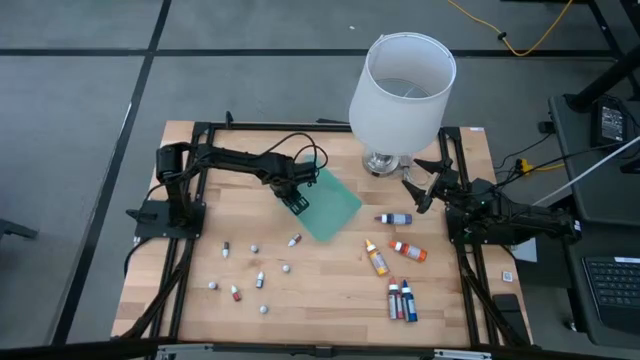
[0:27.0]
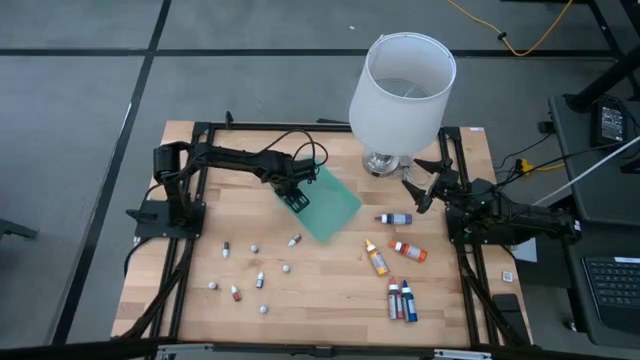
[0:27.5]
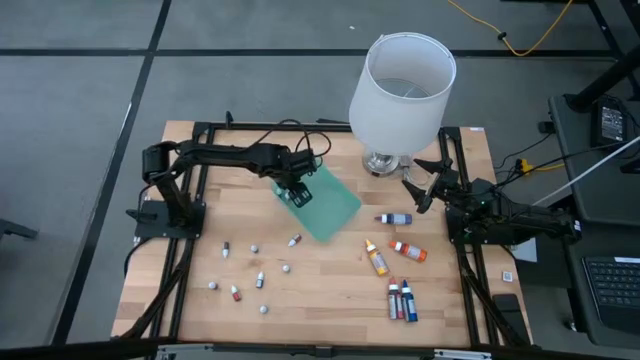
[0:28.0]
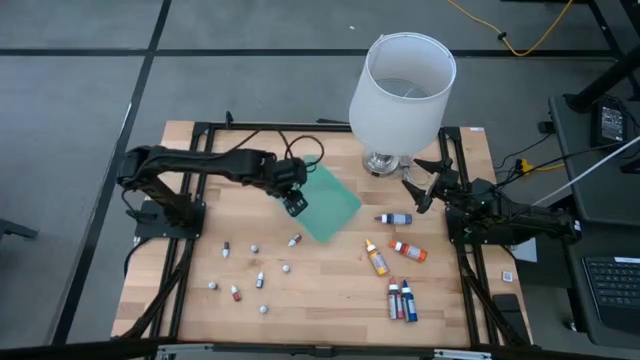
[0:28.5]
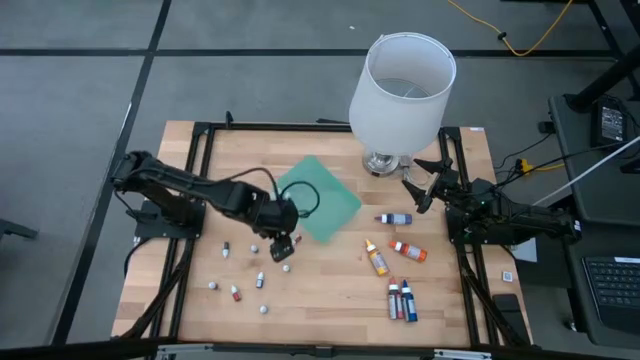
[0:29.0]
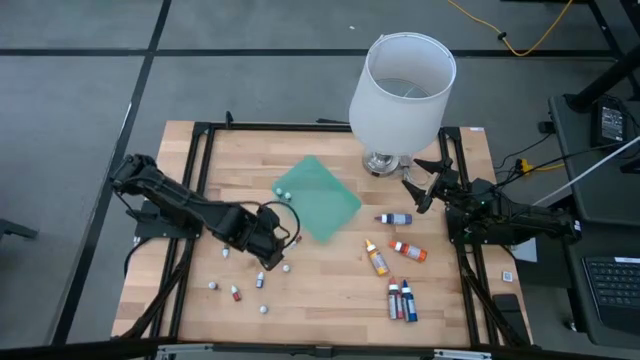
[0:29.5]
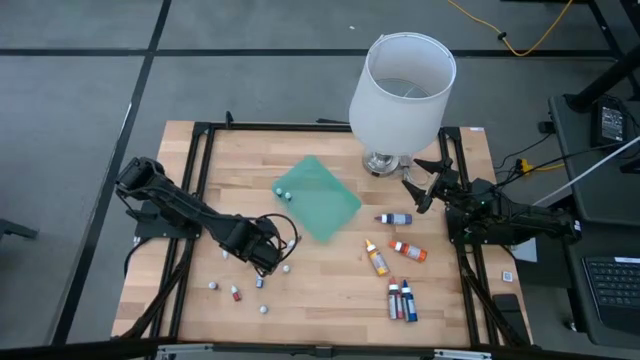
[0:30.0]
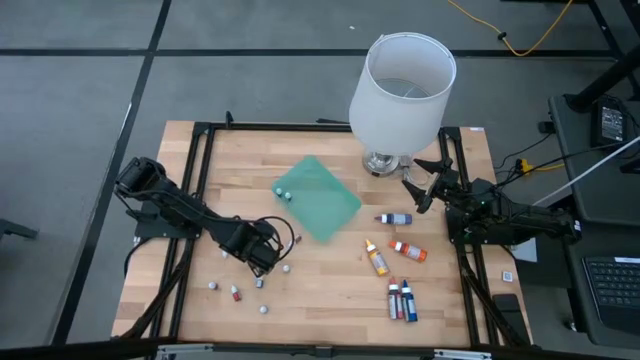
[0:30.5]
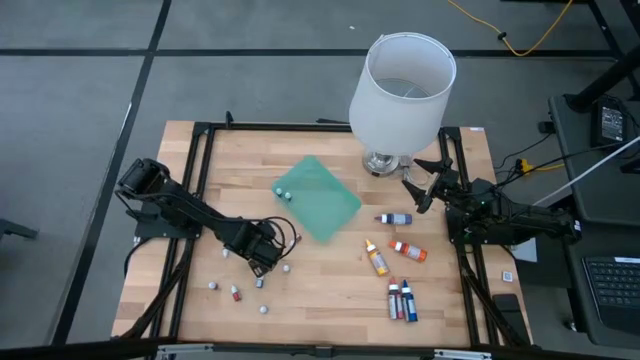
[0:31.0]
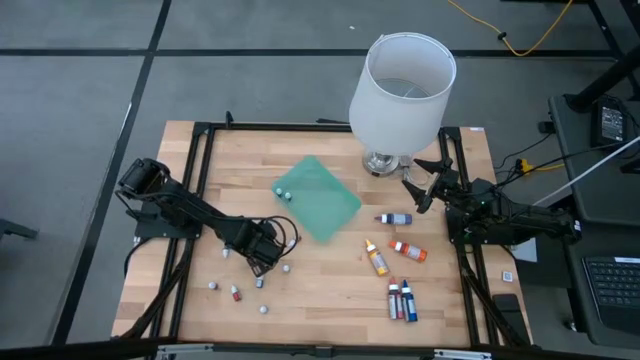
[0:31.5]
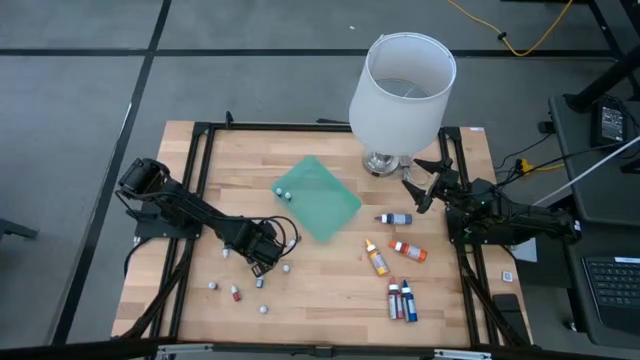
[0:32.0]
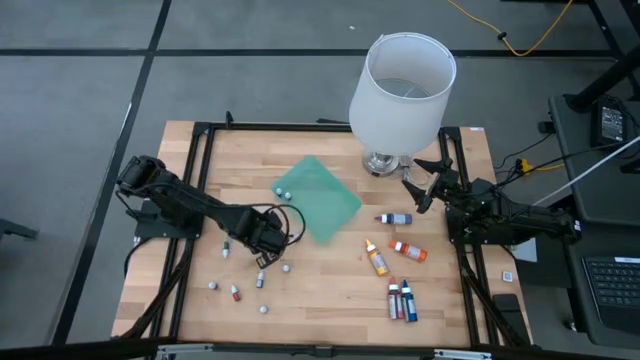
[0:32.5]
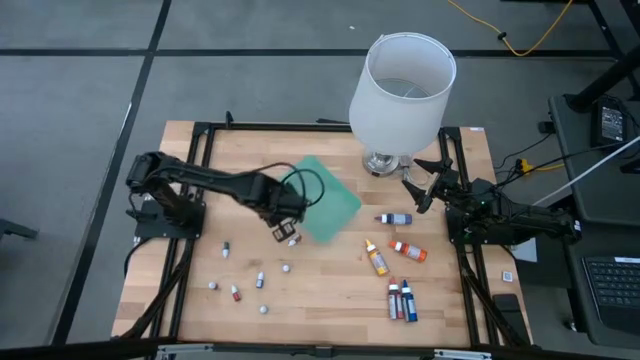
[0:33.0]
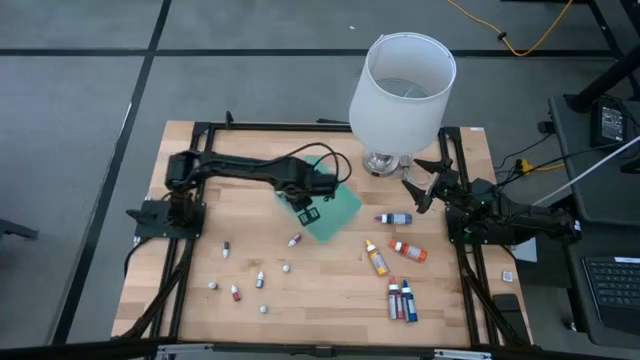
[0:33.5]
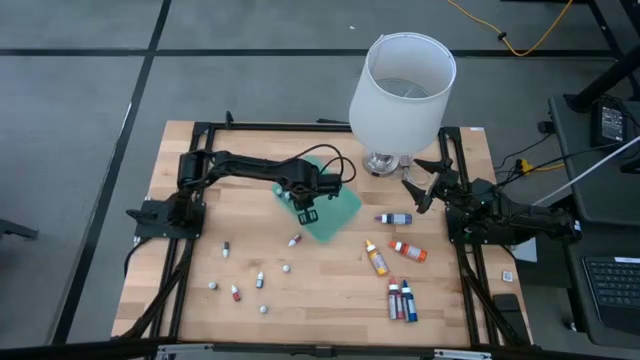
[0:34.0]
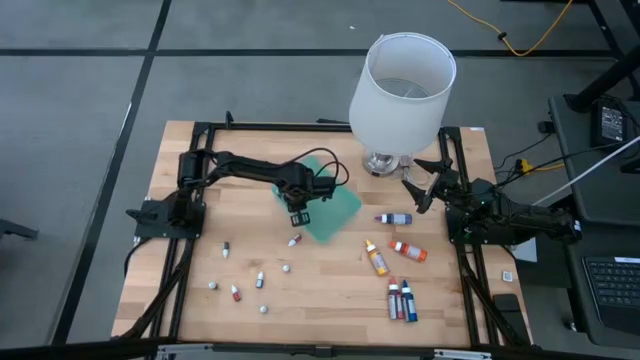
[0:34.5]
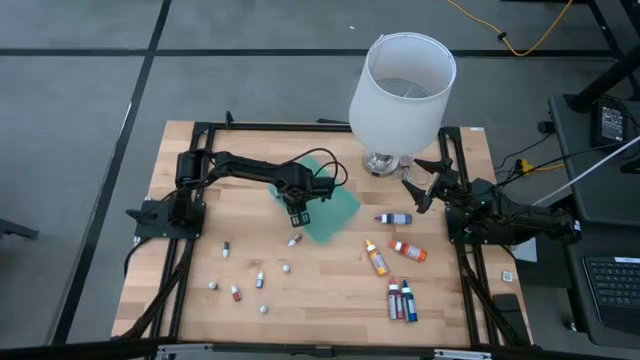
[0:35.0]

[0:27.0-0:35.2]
Task: Pick & Place food coloring
Put the top small blue food coloring bottle into the green bin

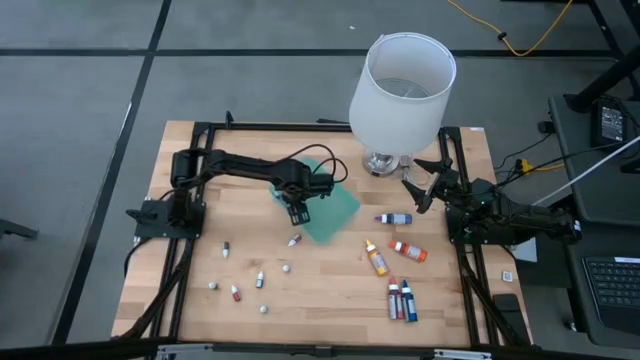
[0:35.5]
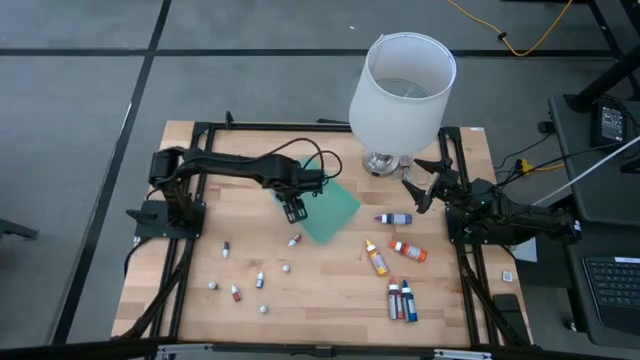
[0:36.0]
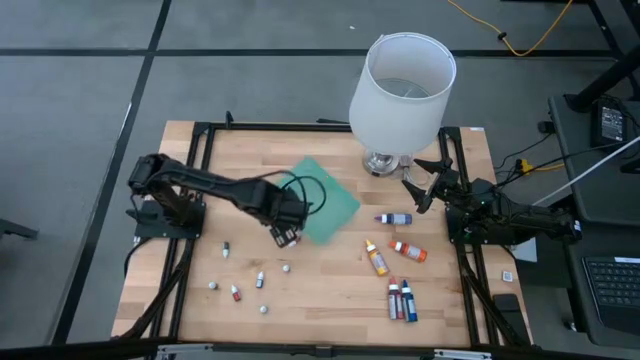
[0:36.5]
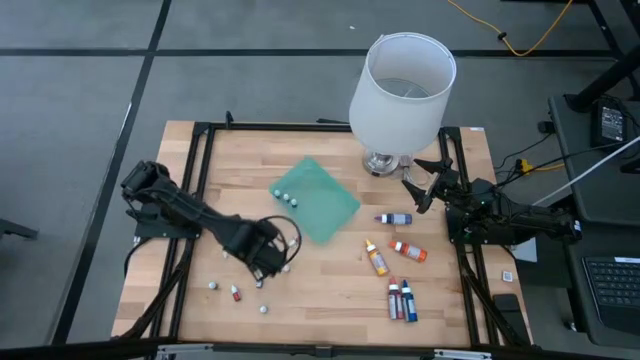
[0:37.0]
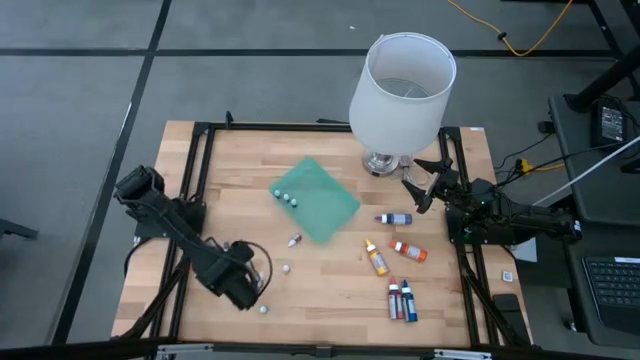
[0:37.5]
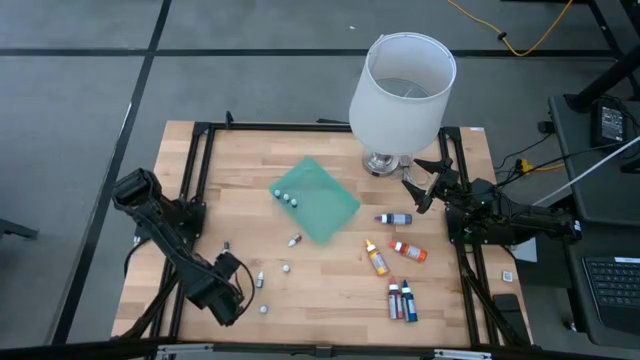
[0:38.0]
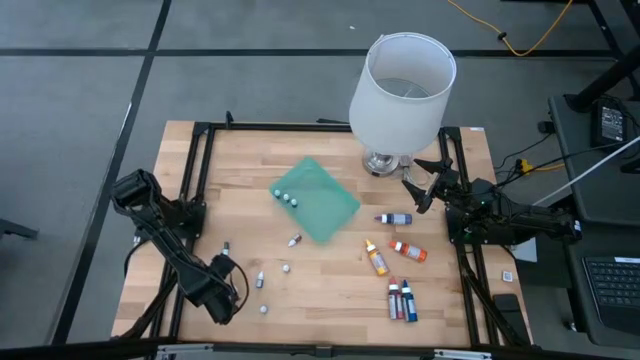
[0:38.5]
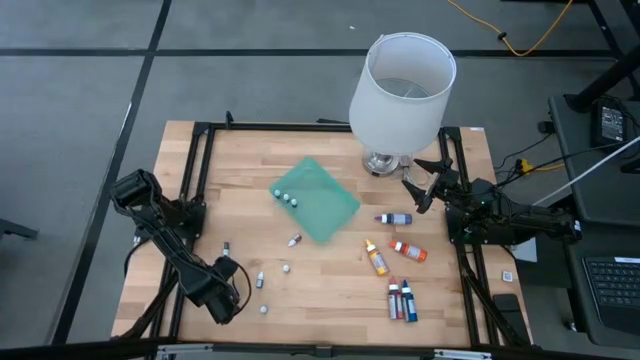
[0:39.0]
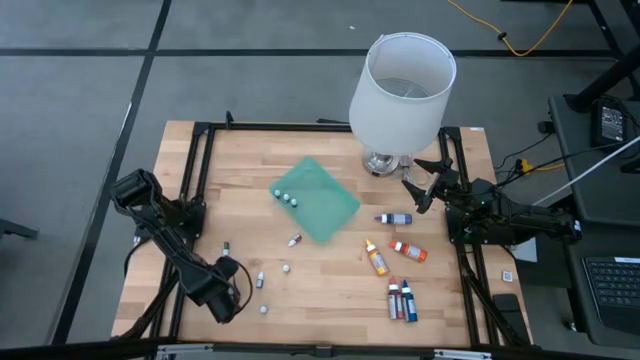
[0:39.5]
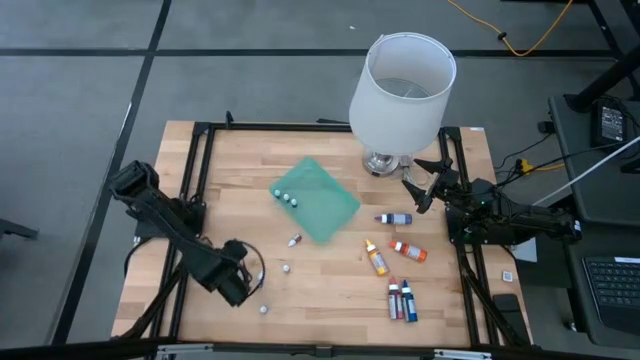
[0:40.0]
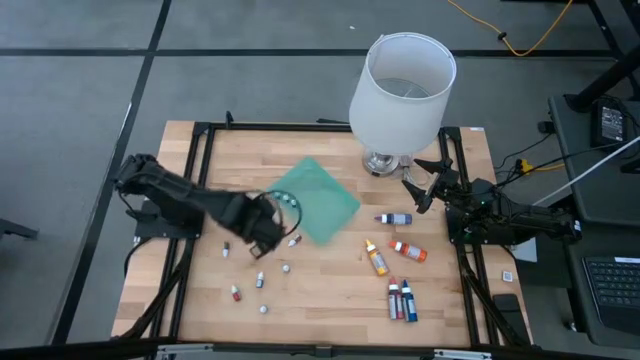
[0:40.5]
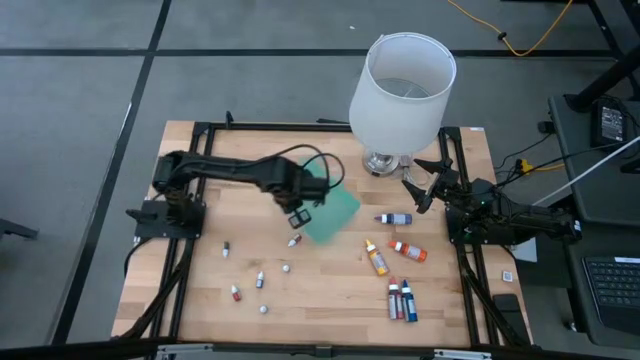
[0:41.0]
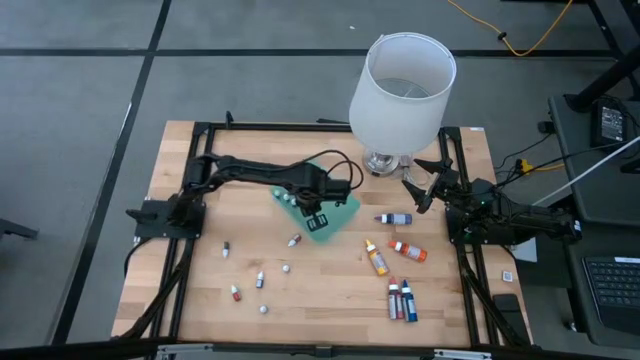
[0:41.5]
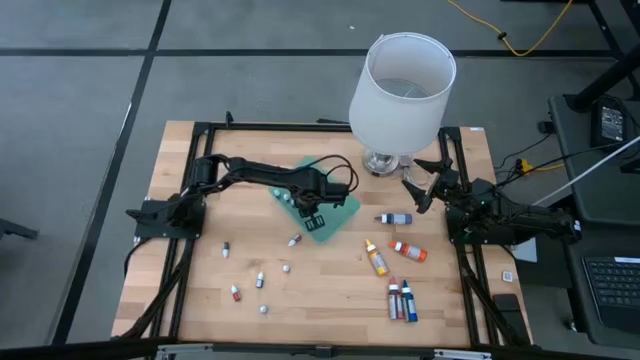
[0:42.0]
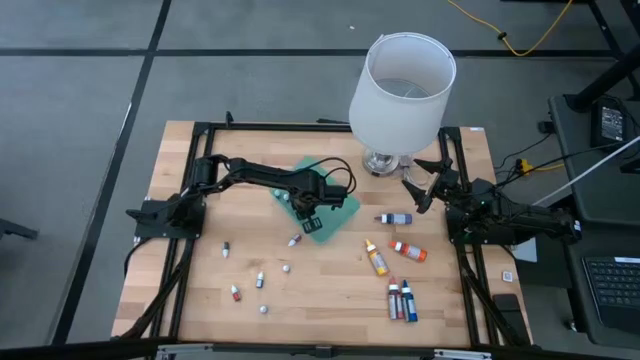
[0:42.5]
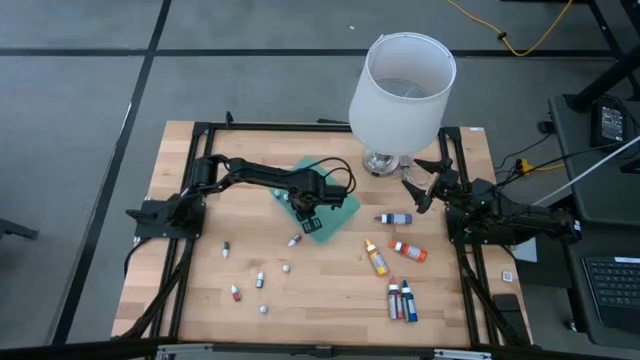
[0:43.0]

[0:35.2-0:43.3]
Put the small pink food coloring bottle into the green bin

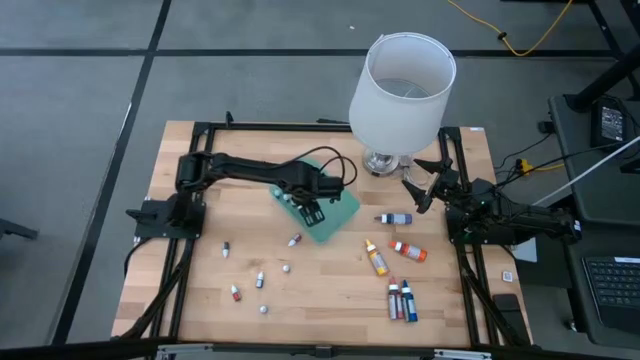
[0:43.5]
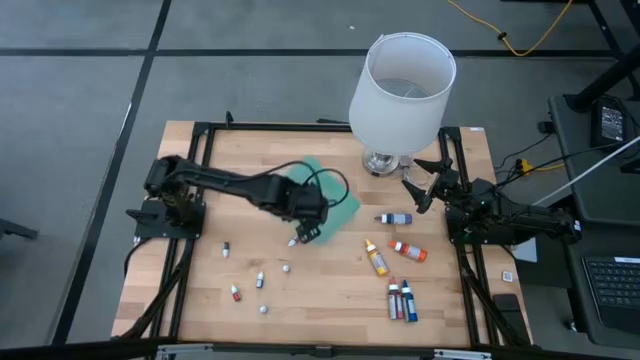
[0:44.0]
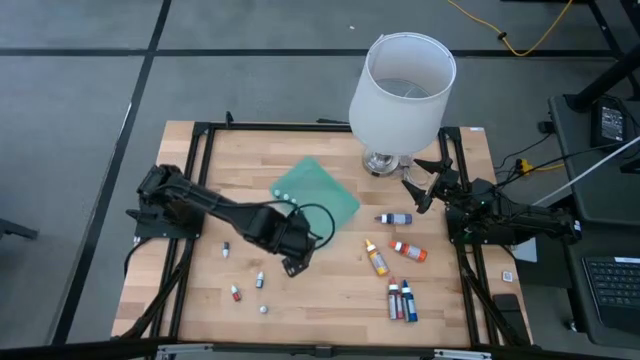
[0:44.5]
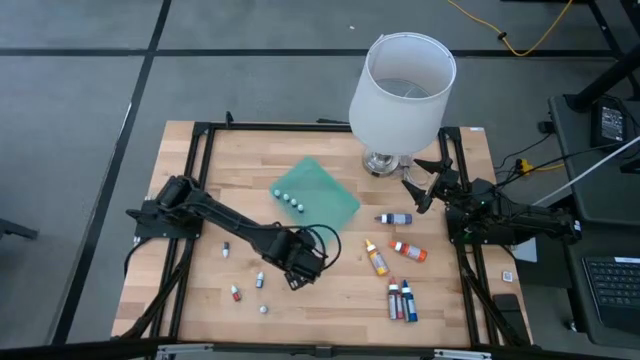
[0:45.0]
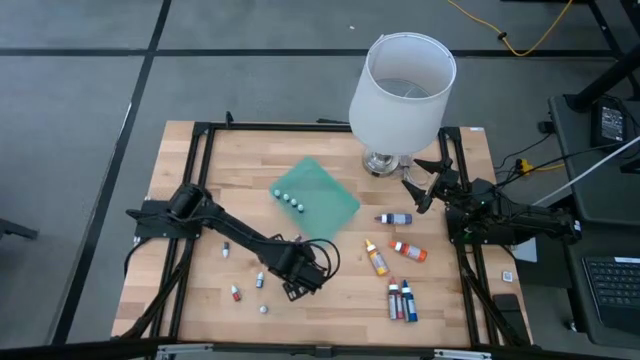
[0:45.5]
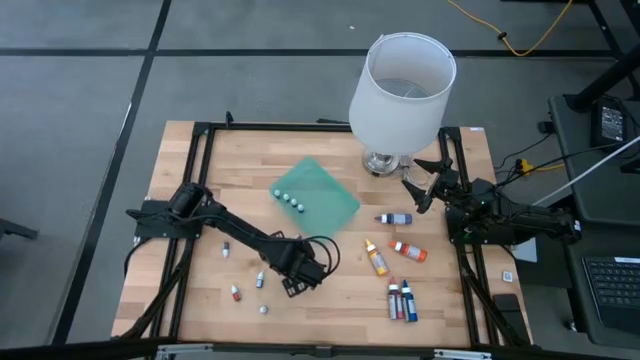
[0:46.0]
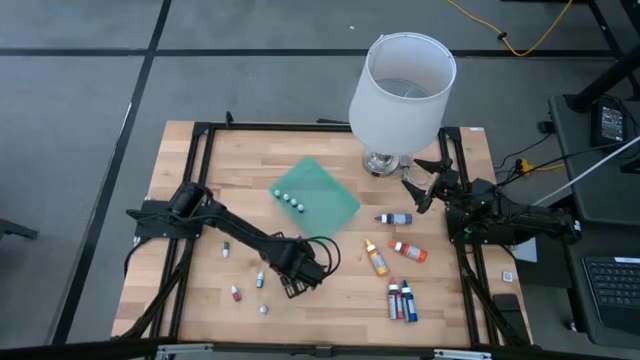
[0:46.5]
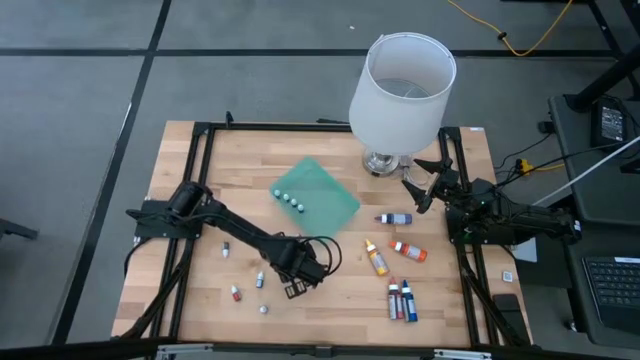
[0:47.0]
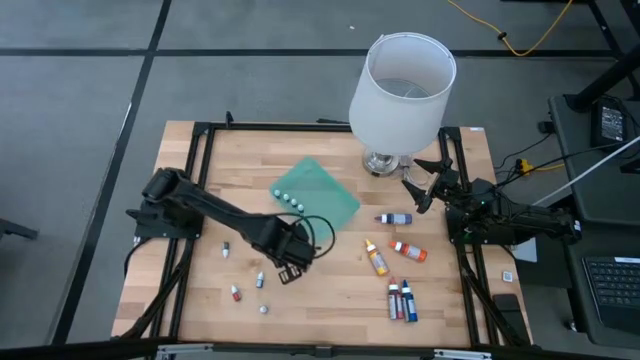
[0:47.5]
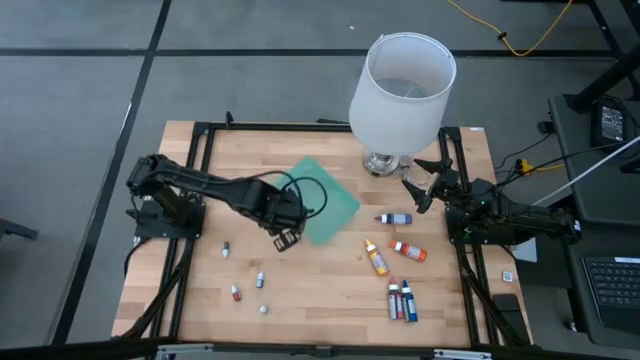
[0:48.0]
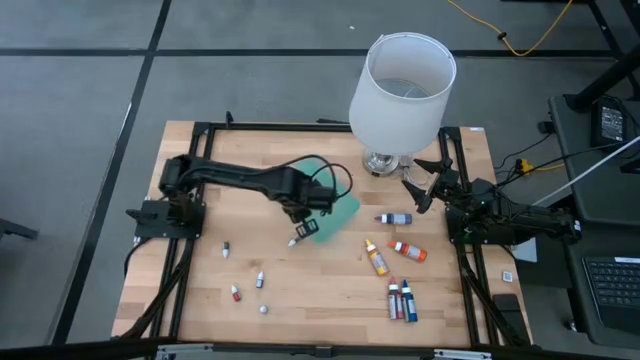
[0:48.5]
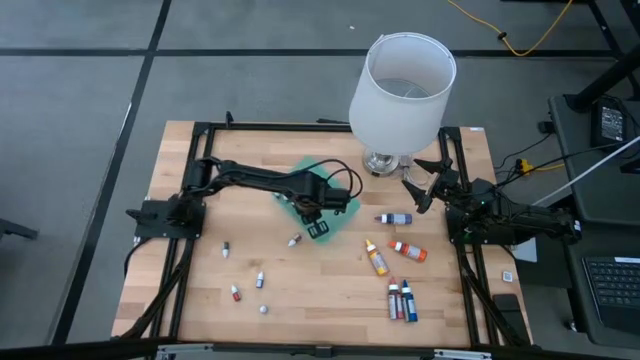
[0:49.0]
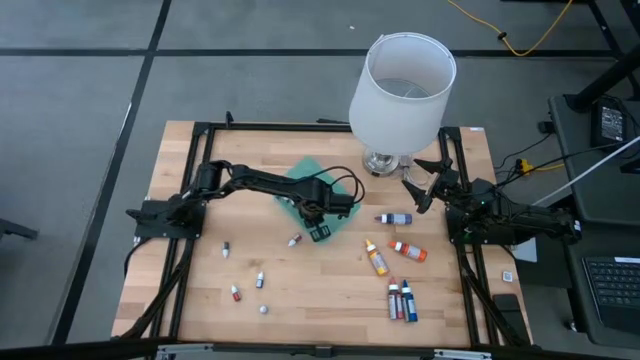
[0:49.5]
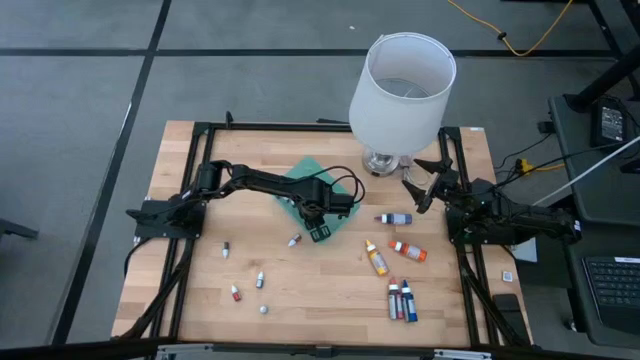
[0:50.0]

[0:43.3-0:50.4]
Put the top small black food coloring bottle into the green bin
